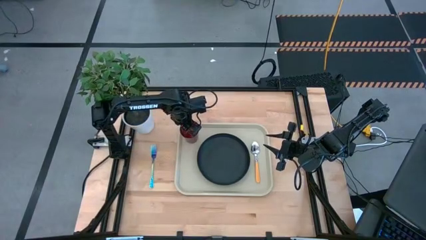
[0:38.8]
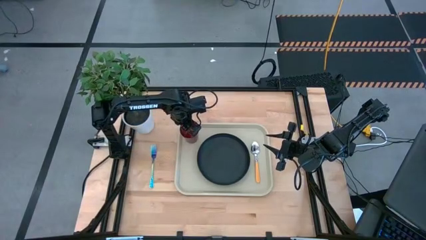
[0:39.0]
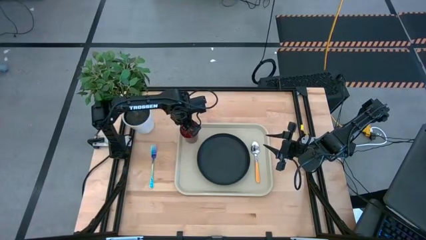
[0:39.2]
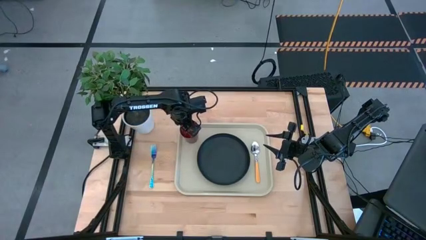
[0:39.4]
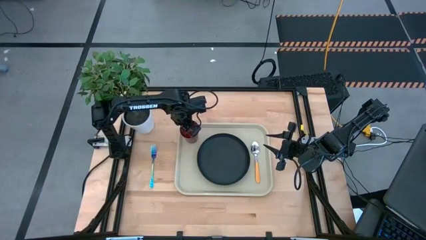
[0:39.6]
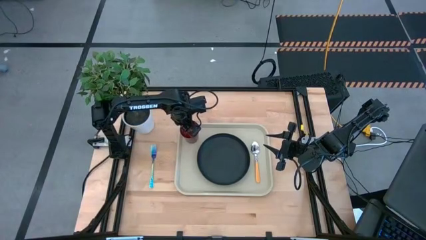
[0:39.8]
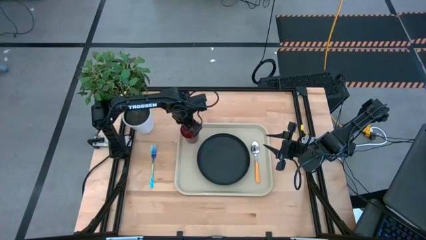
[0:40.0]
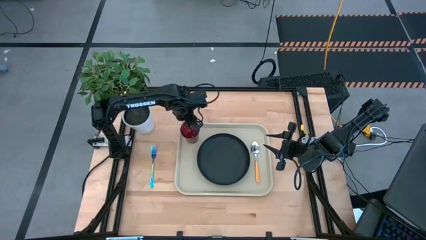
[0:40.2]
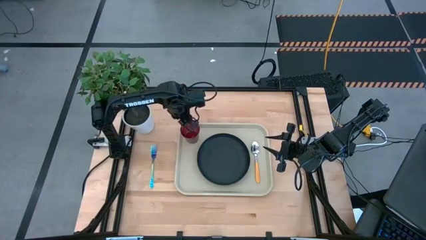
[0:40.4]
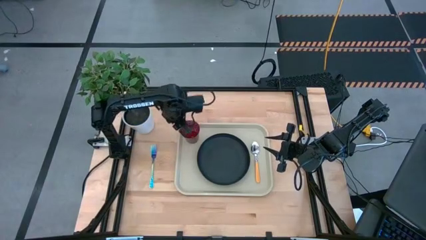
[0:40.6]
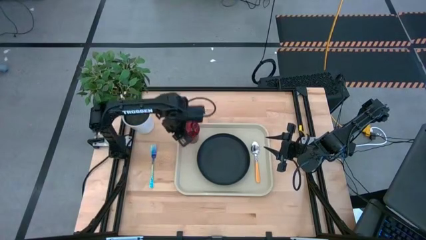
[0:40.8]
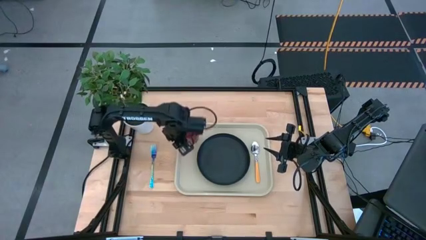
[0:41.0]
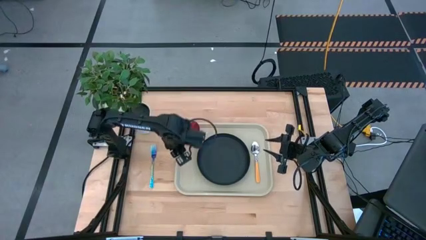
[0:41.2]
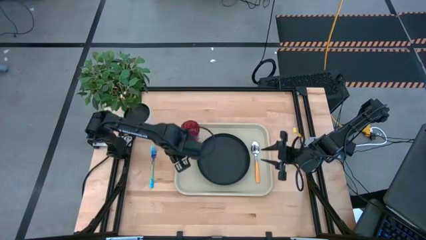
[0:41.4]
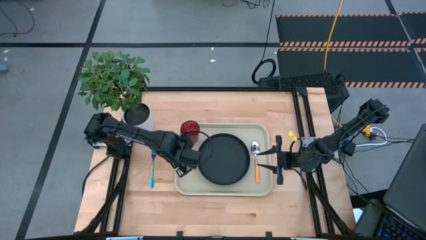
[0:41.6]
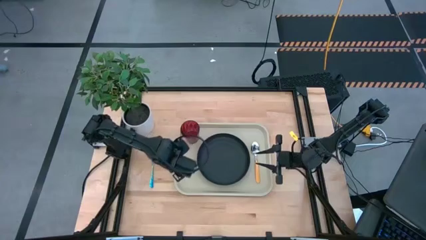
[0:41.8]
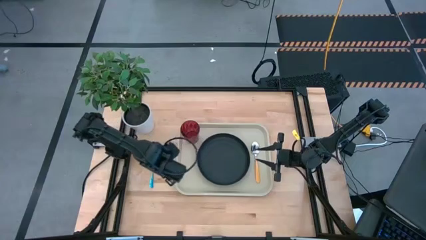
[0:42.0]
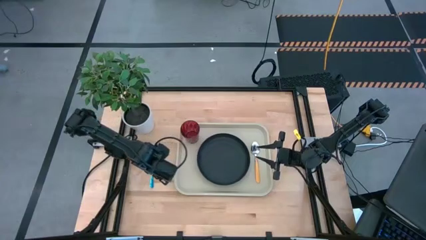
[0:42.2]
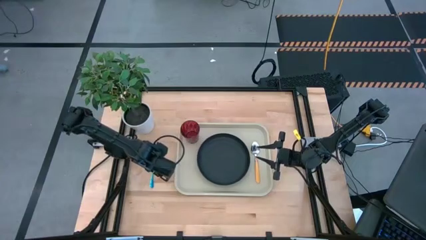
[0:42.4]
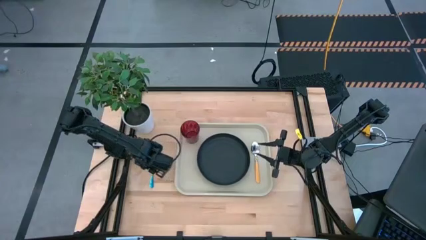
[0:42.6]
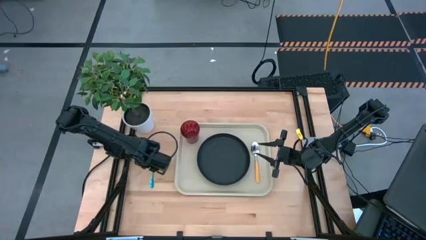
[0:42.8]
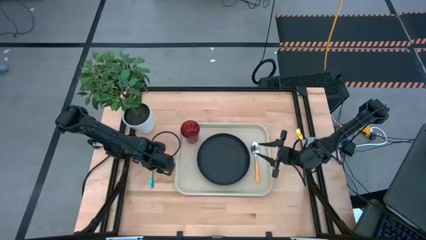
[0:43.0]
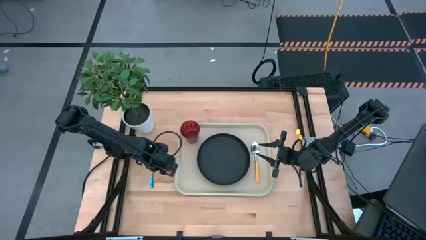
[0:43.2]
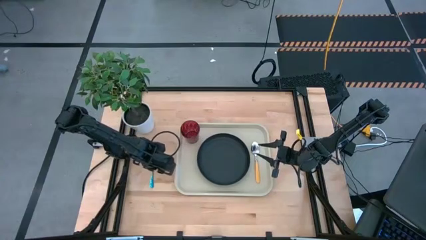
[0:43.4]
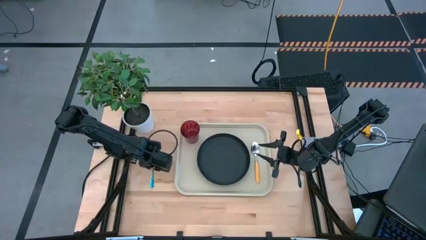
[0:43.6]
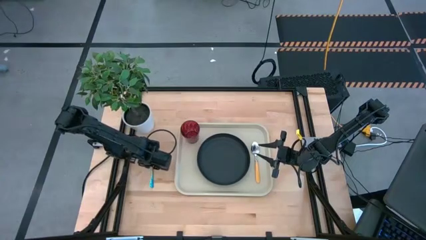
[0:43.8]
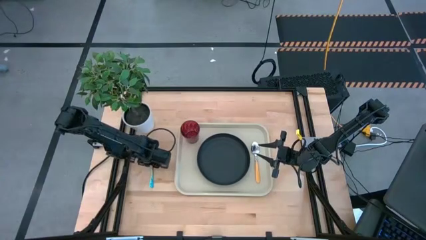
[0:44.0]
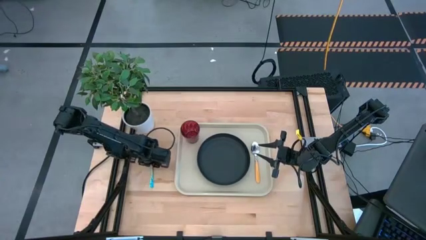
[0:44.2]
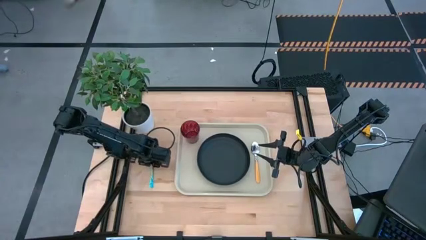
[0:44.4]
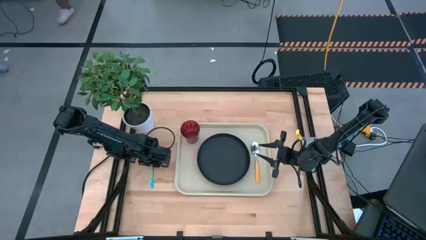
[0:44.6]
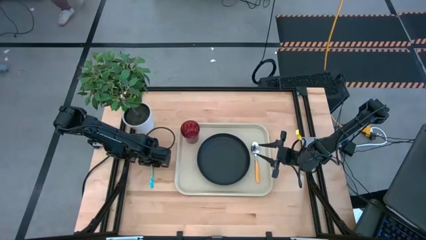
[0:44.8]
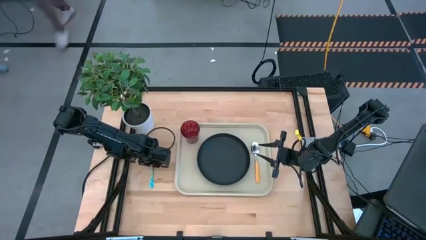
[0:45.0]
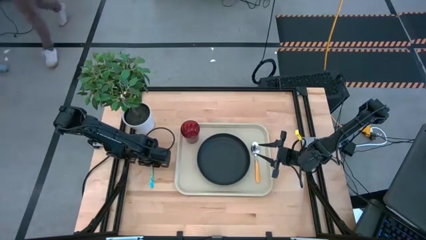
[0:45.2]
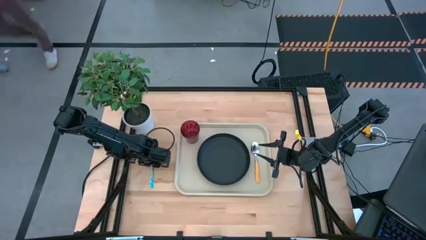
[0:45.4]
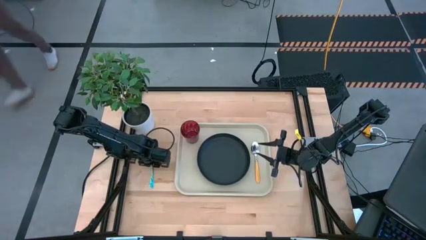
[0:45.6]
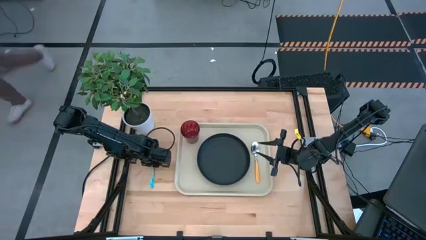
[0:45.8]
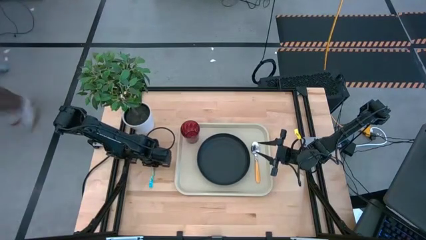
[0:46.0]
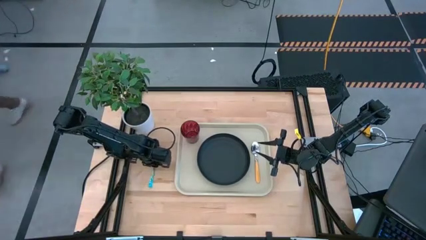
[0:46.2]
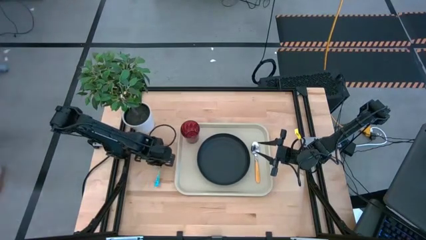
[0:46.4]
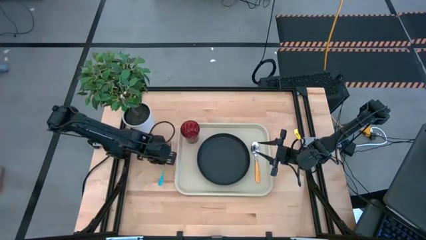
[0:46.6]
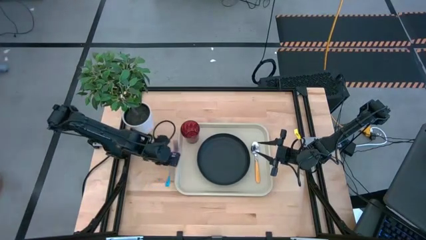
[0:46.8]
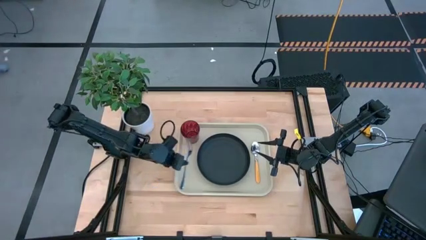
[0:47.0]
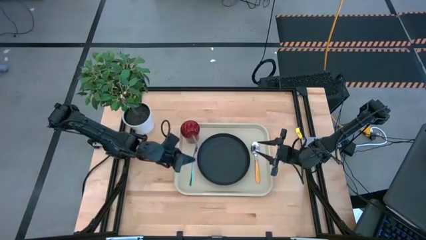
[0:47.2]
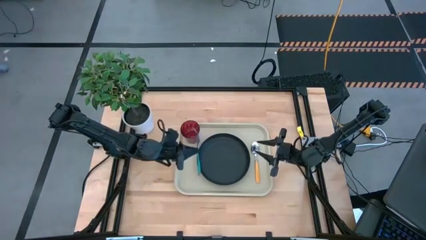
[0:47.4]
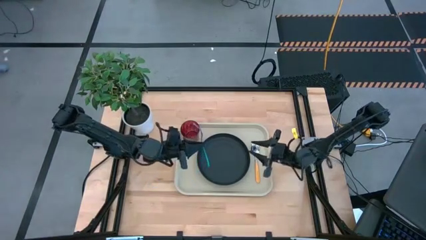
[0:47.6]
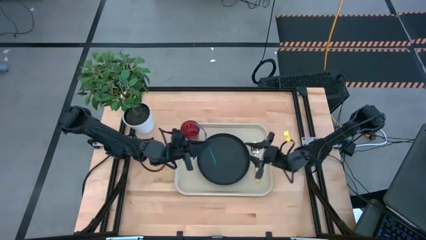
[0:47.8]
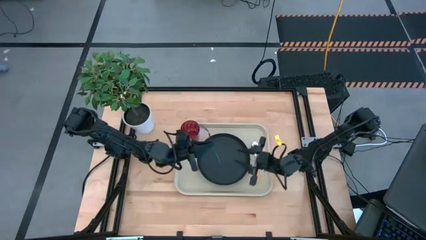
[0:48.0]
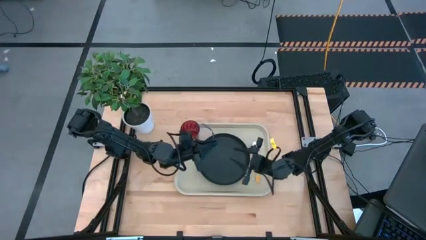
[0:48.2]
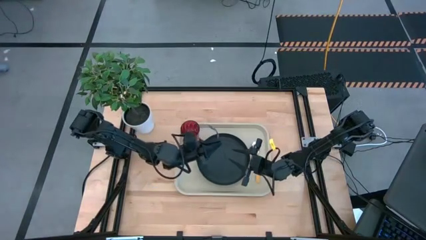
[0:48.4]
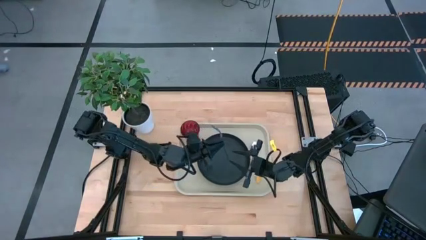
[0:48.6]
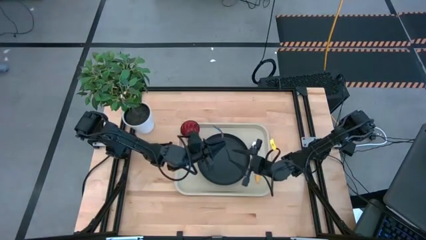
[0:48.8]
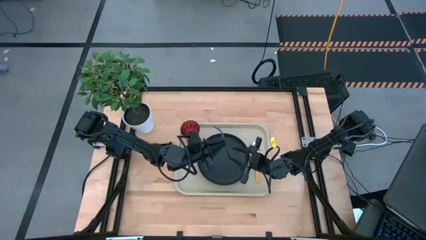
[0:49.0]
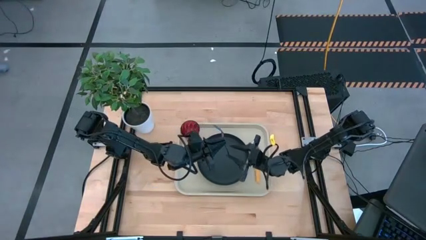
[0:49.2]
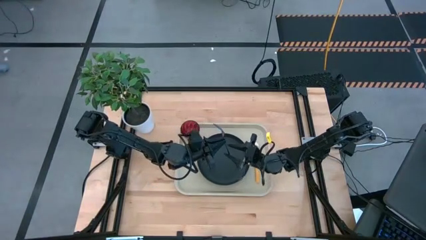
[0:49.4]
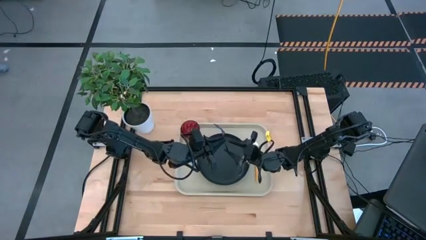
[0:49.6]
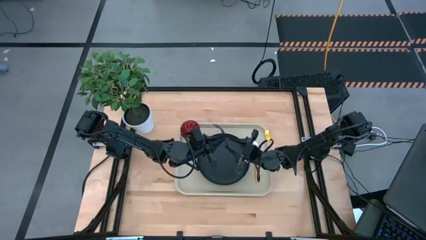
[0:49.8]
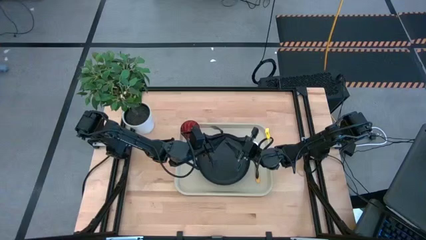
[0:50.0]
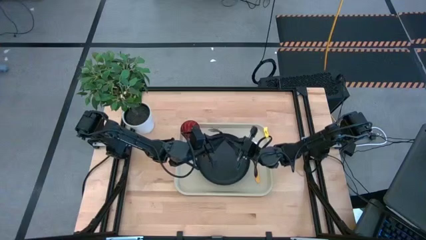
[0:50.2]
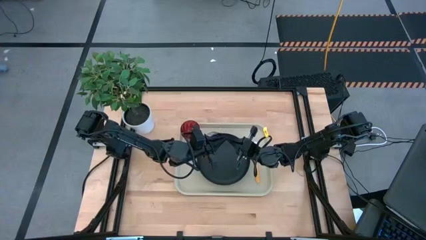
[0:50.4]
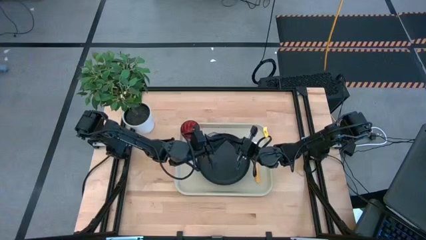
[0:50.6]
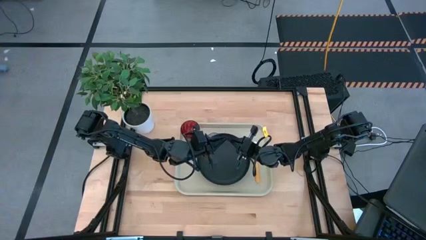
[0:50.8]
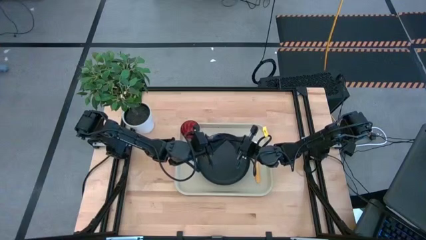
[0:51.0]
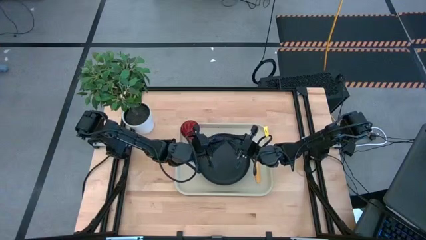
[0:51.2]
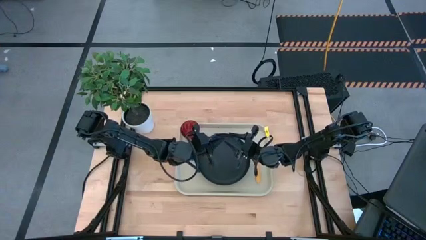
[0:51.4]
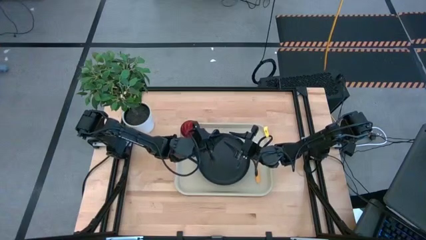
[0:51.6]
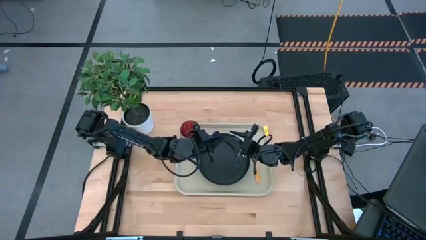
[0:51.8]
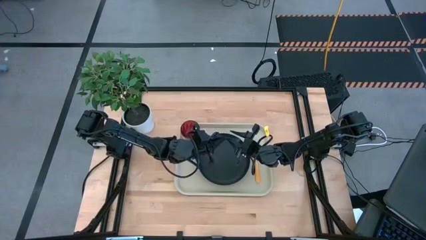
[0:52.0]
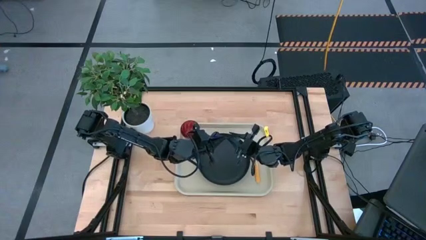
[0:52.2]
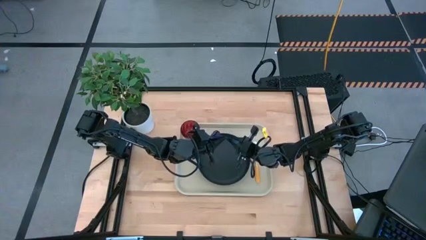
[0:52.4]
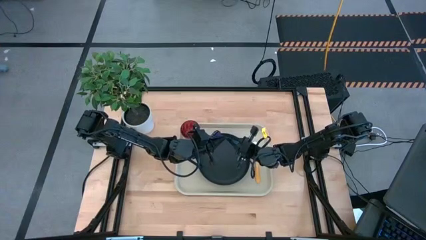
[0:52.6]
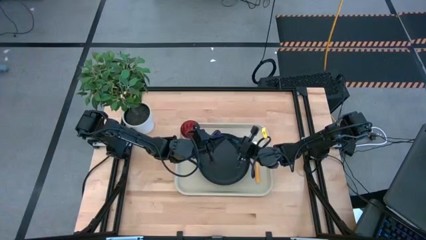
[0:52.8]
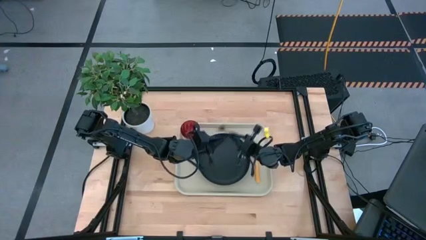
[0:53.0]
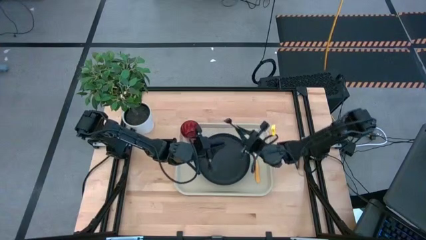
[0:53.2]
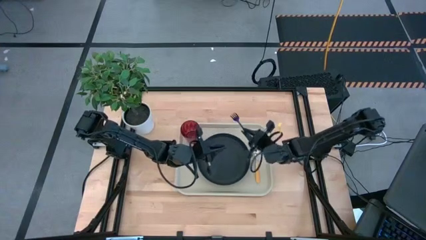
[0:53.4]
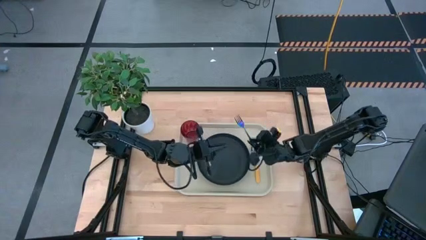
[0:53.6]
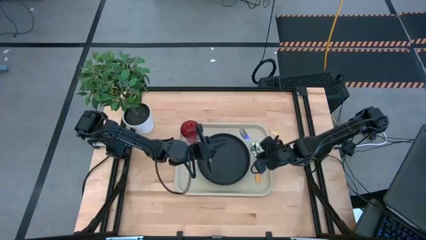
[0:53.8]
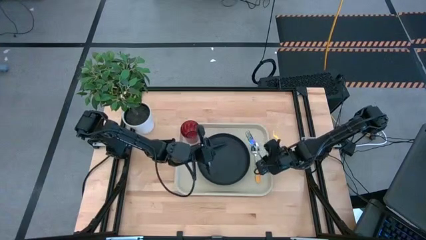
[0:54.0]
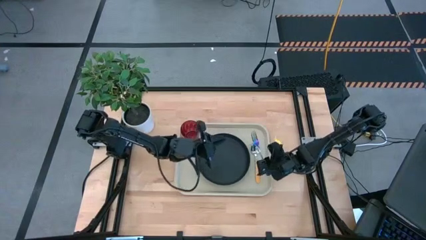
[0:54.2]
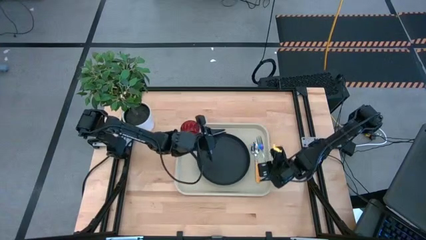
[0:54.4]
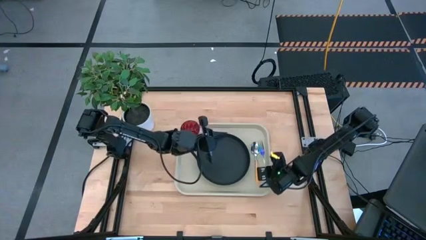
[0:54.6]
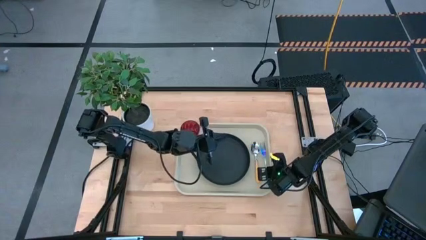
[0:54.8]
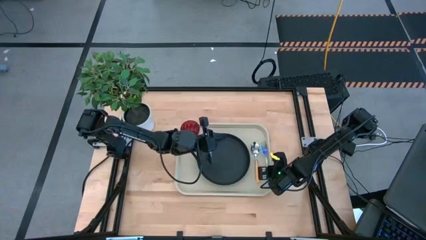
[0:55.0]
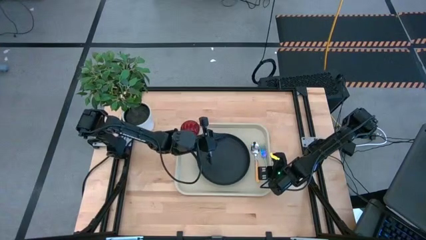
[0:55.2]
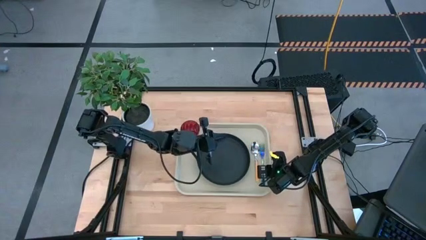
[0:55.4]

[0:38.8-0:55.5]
Task: Pick and place plate/cup/fork/spoon on tray
Put the fork to the right of the spoon on the tray
